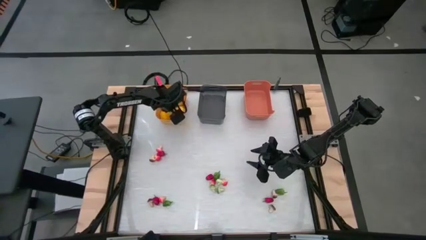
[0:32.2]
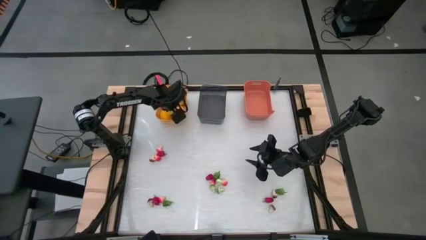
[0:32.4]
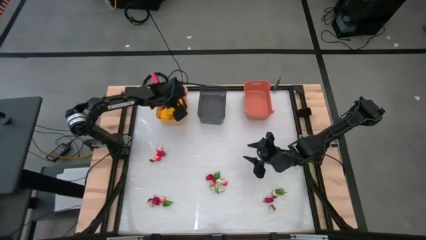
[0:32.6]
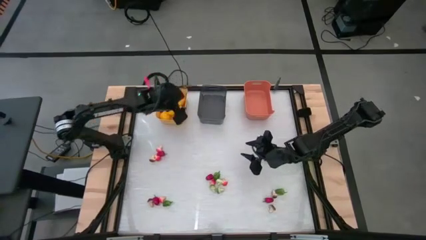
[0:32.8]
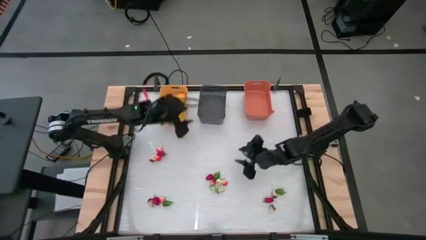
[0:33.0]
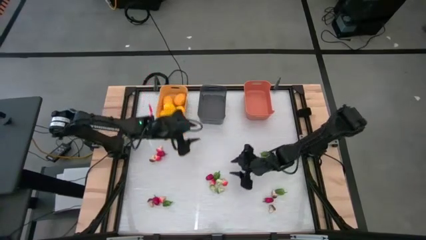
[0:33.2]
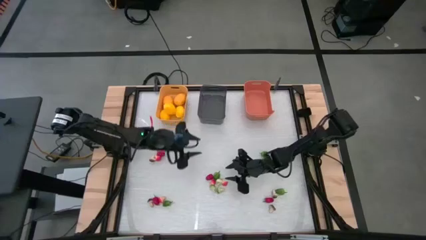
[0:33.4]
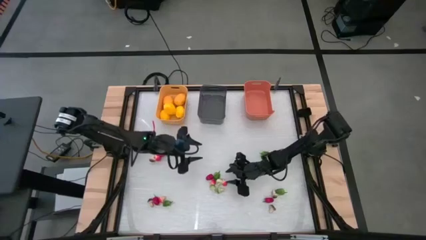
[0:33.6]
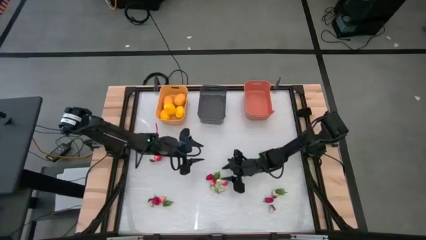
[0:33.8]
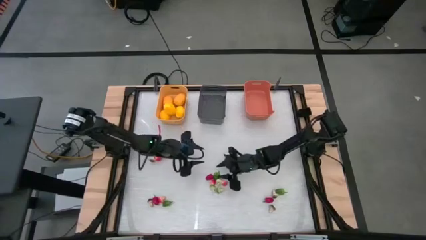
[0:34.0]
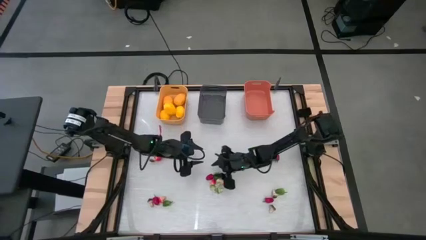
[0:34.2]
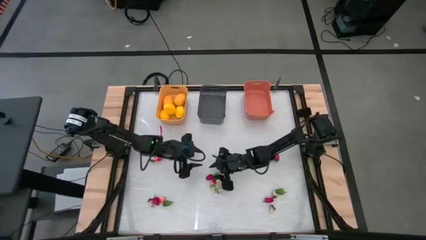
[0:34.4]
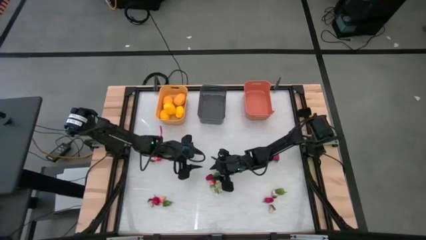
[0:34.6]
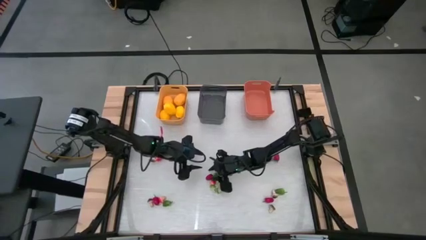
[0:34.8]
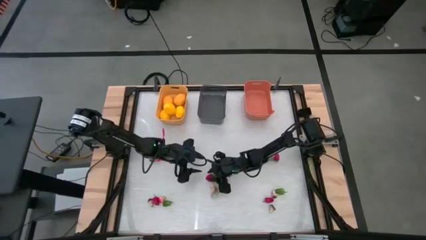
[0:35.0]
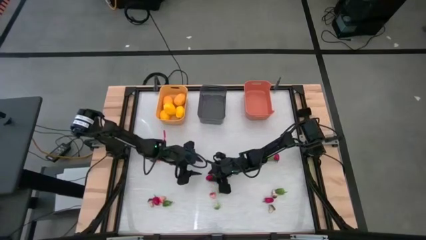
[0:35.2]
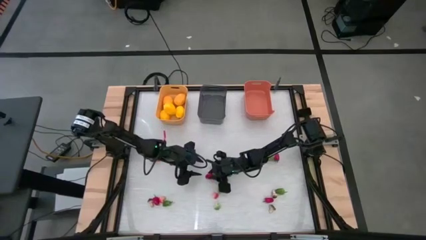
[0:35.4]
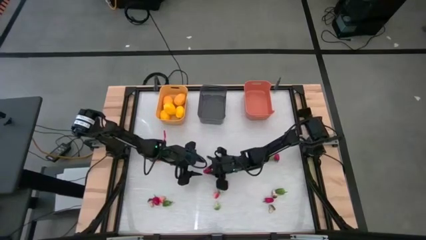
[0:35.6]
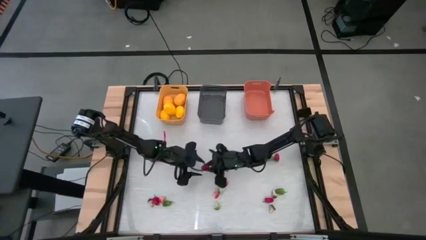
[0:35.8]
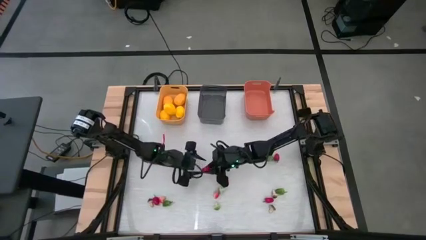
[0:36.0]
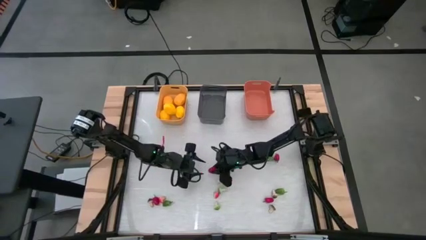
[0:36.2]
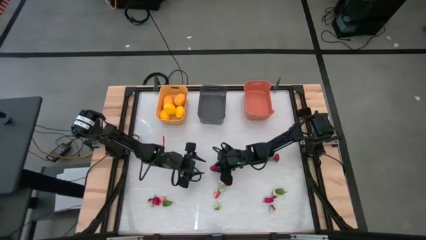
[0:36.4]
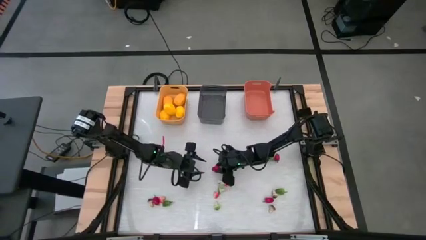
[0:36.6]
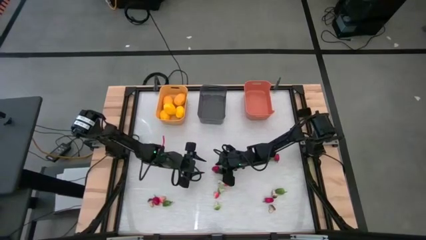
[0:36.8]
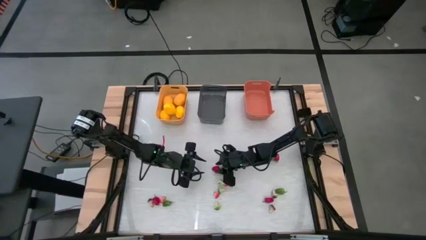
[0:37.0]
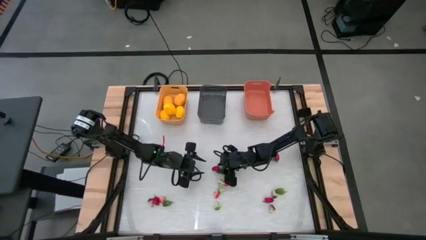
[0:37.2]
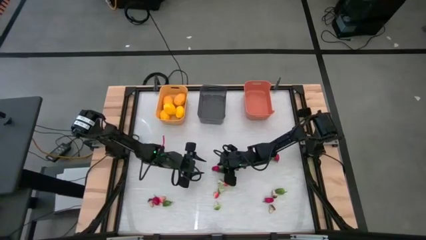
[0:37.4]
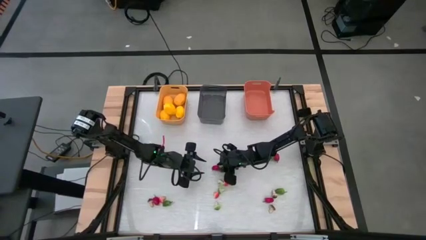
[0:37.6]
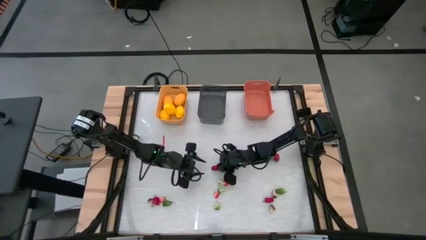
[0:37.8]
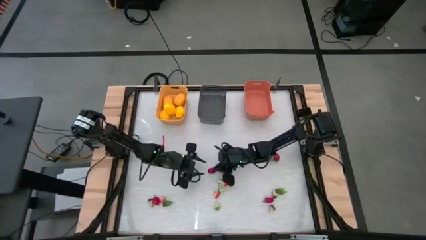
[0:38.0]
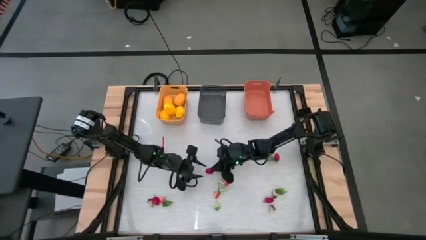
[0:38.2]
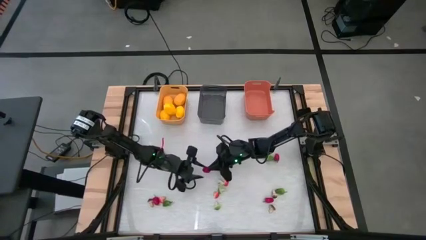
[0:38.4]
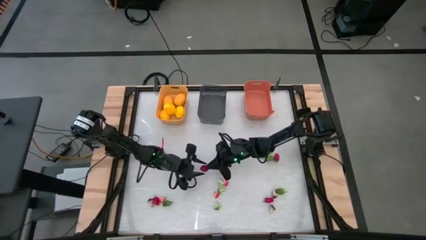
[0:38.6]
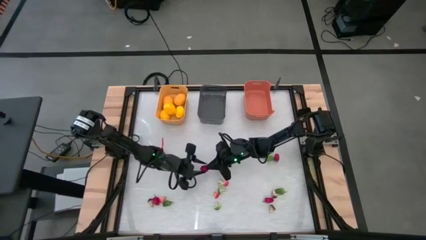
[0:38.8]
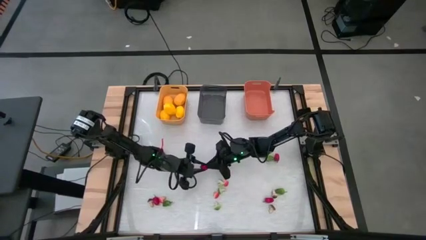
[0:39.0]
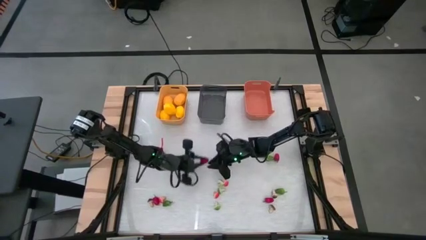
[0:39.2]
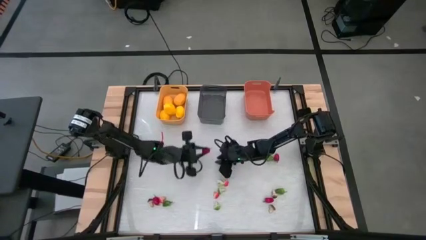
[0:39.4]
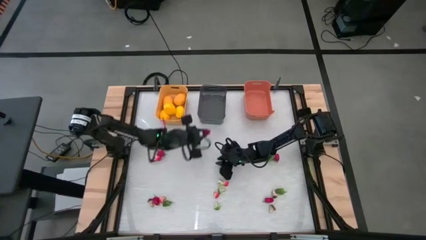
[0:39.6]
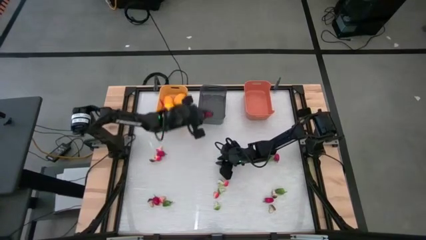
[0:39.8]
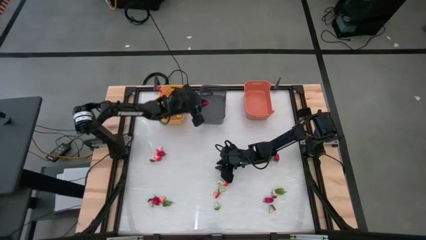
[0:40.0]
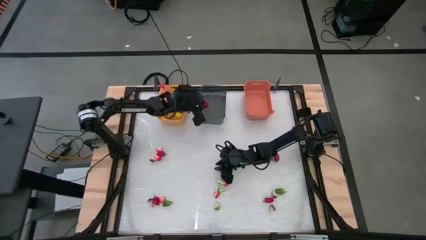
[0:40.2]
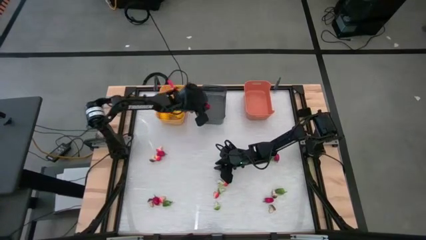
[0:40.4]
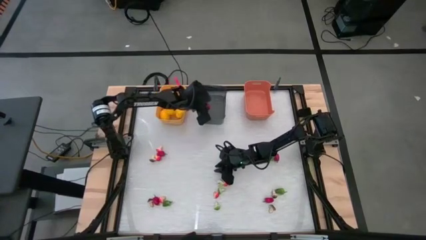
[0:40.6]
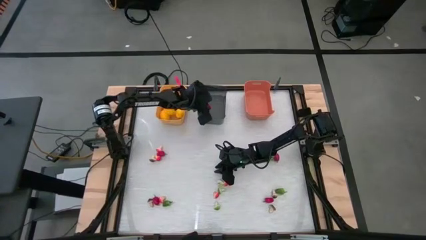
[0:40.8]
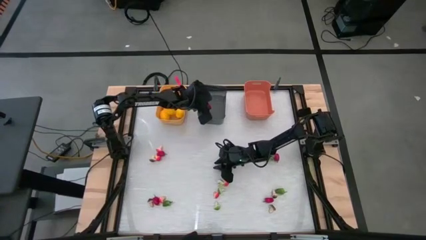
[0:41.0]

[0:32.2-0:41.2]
Task: Sort produce into baskets
Put the red chili pepper into the black bin

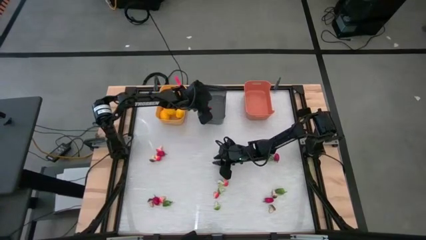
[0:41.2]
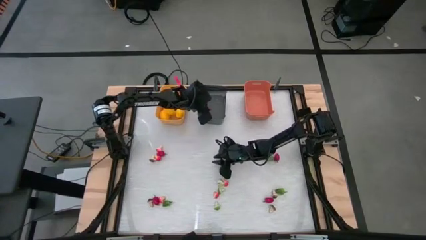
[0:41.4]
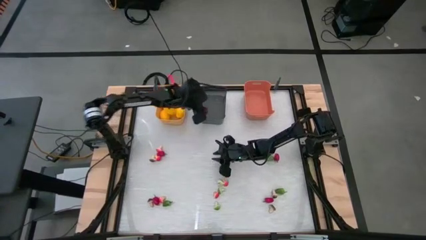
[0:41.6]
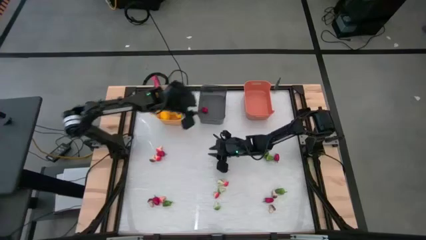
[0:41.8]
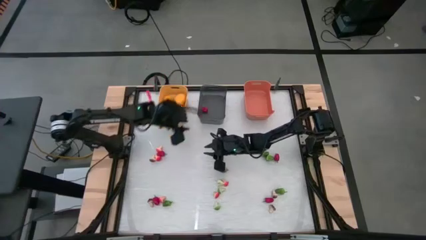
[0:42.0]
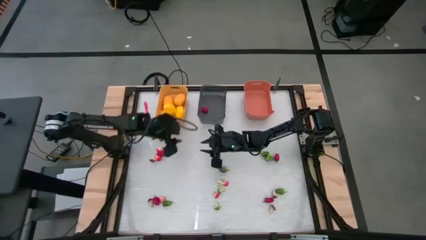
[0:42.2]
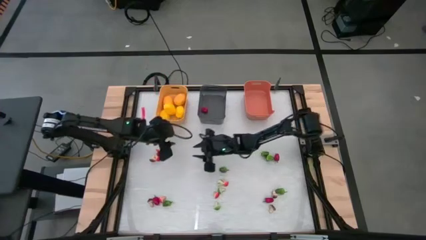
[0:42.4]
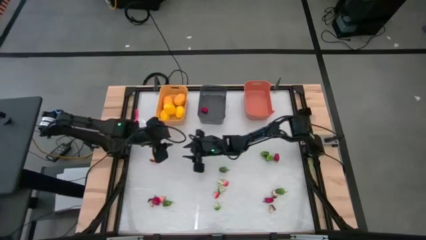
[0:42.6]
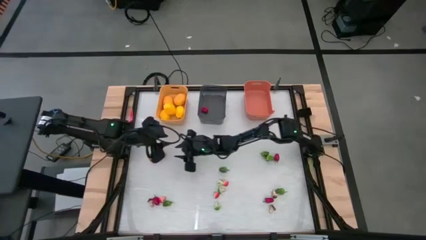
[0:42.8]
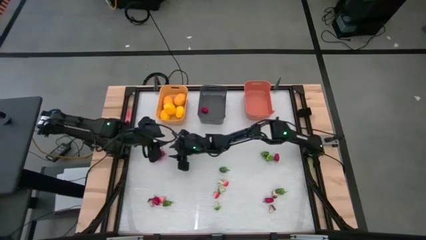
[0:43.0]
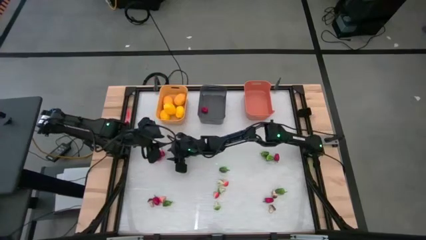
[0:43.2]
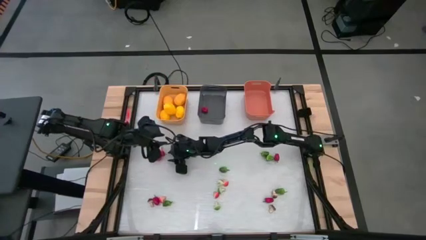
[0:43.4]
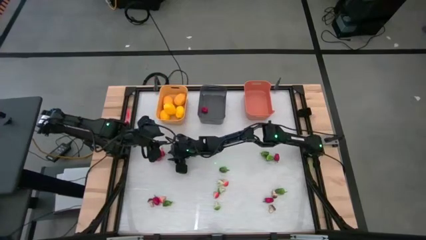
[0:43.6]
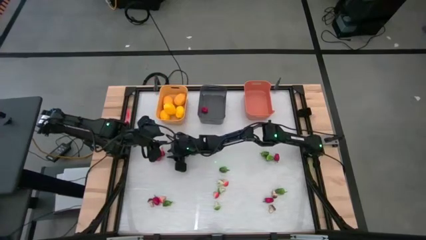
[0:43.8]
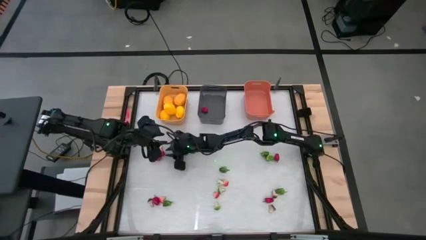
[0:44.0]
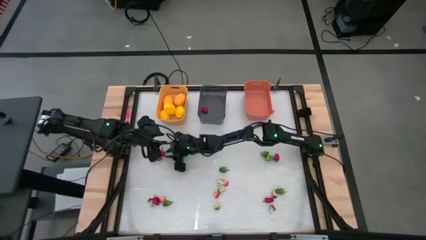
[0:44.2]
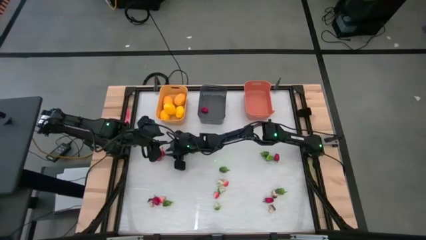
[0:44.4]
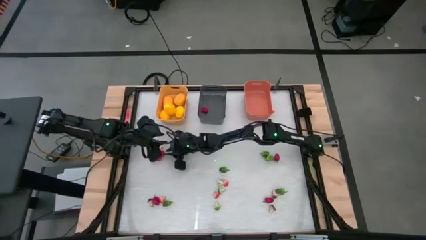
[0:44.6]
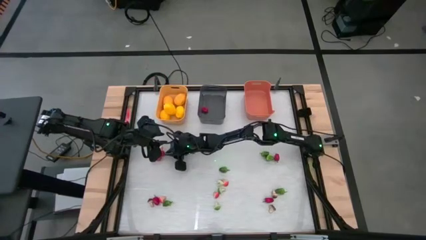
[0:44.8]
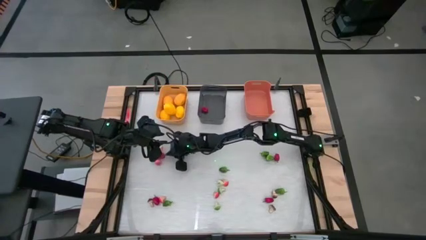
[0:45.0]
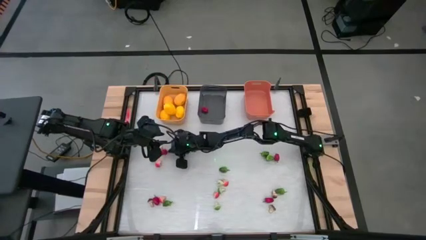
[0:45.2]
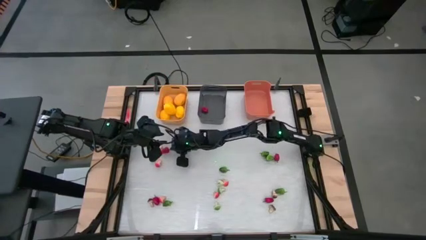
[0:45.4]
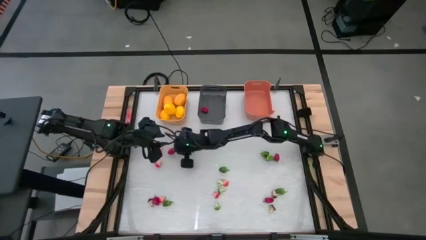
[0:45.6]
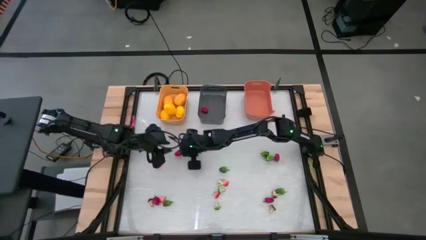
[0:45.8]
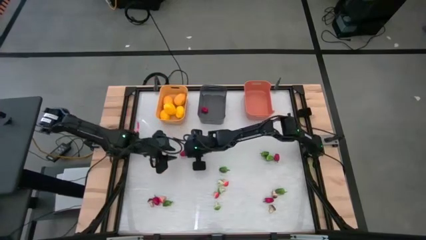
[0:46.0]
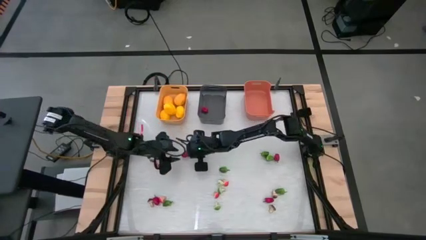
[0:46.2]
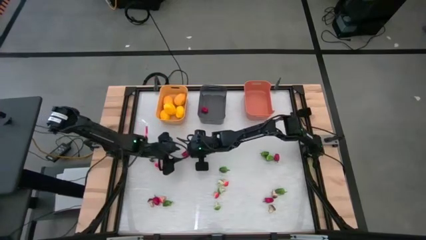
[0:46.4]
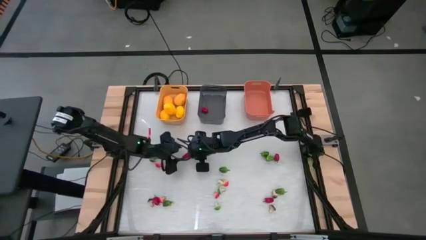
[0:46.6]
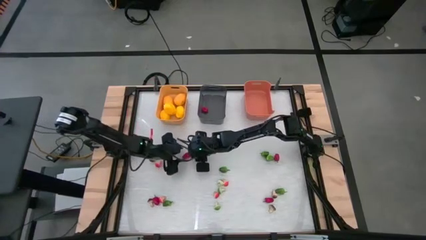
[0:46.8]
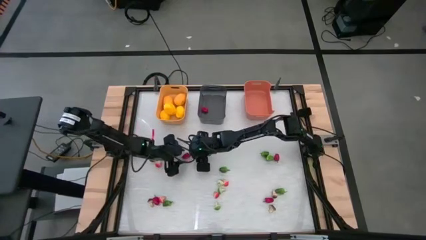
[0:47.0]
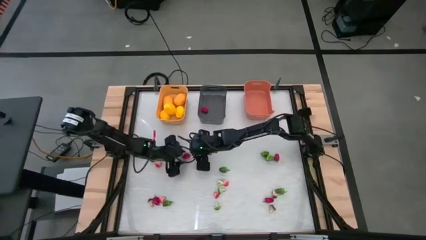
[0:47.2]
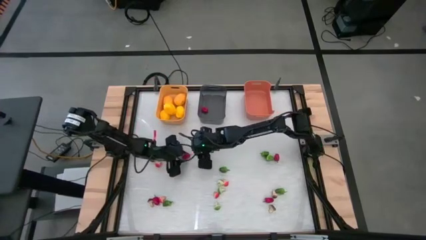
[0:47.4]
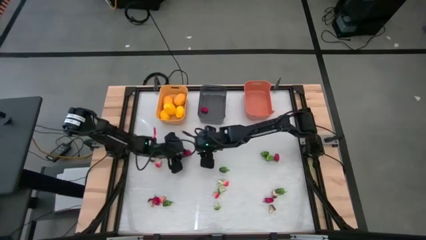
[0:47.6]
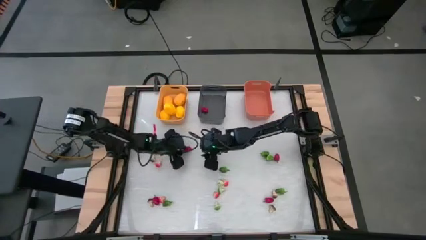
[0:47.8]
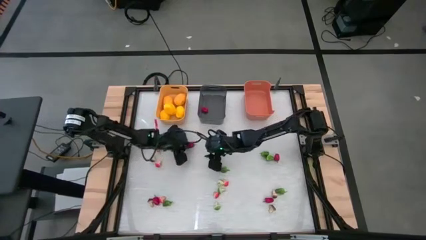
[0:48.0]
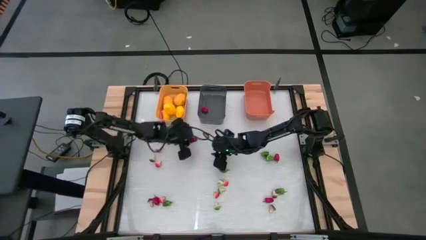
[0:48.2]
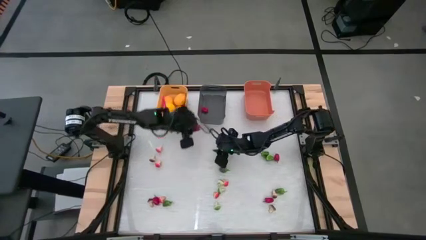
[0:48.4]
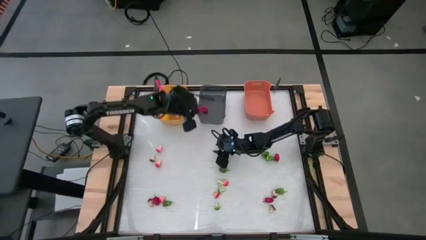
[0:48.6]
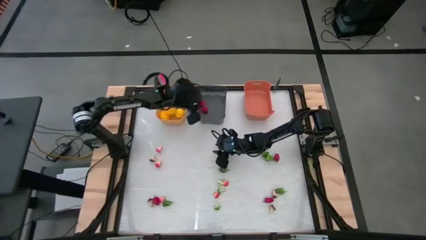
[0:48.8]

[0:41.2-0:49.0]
Put the red chili pepper into the black bin
